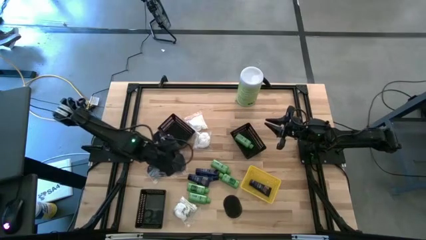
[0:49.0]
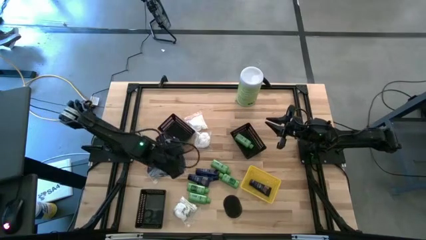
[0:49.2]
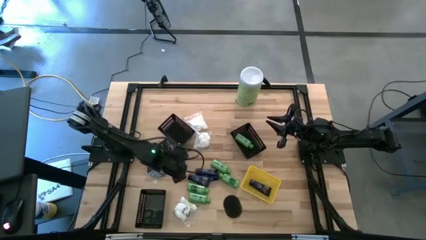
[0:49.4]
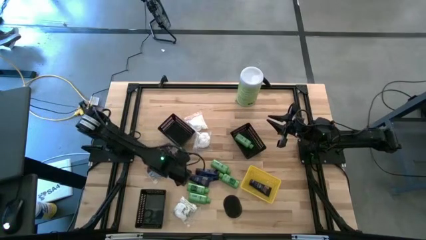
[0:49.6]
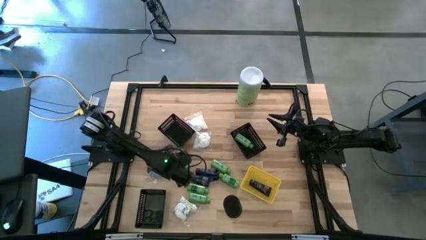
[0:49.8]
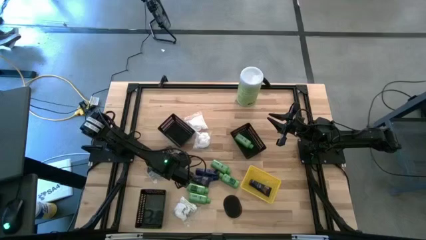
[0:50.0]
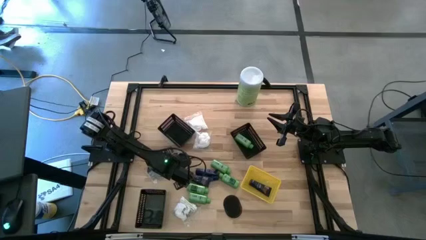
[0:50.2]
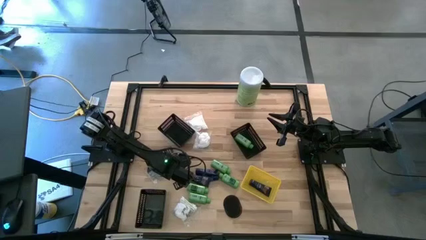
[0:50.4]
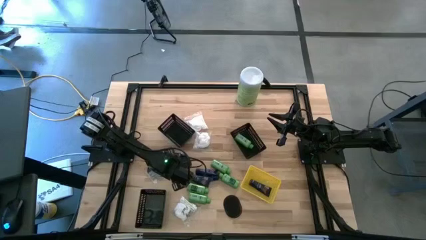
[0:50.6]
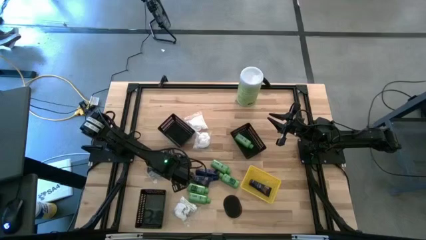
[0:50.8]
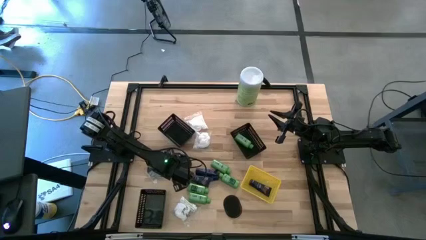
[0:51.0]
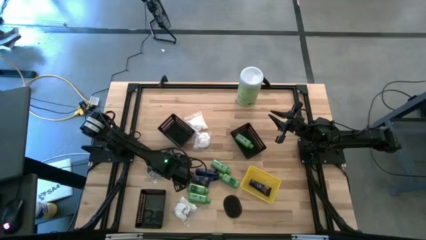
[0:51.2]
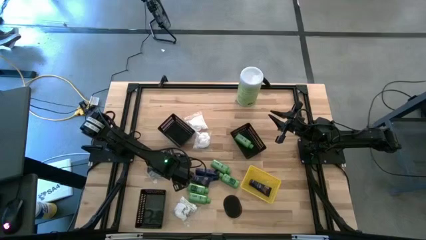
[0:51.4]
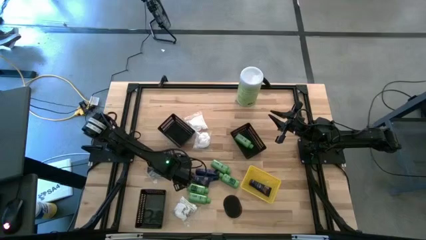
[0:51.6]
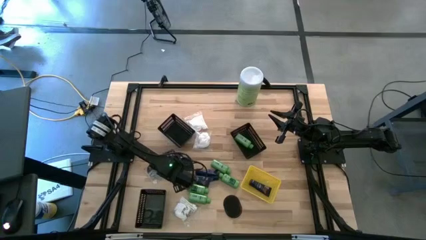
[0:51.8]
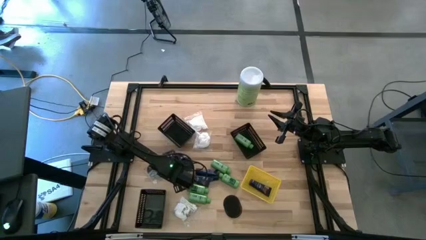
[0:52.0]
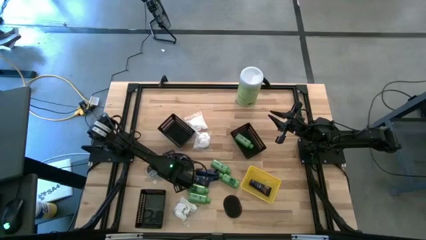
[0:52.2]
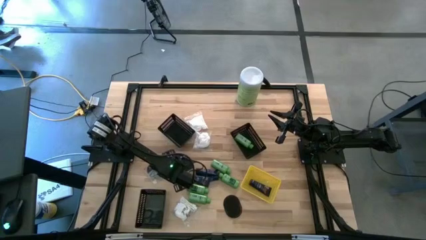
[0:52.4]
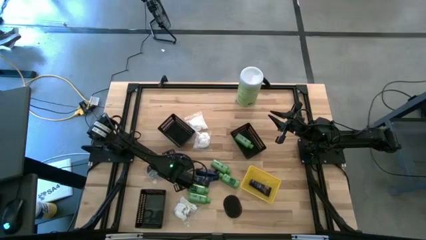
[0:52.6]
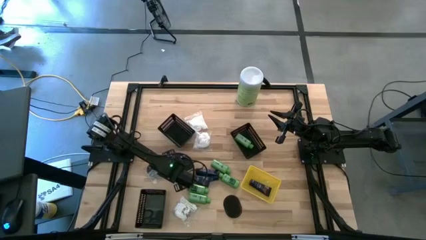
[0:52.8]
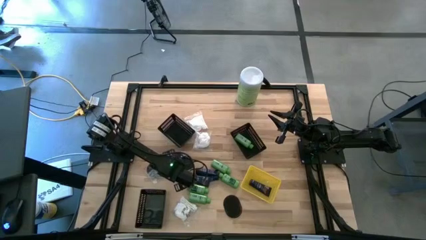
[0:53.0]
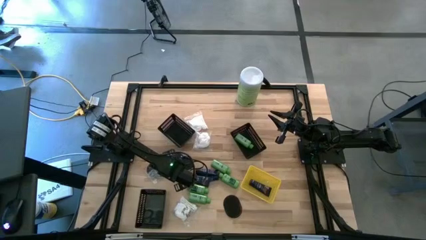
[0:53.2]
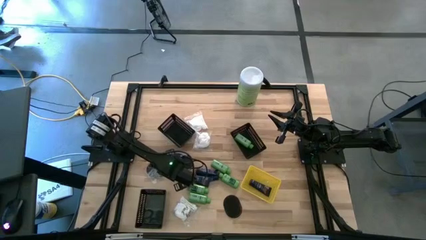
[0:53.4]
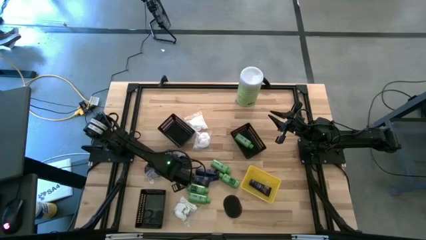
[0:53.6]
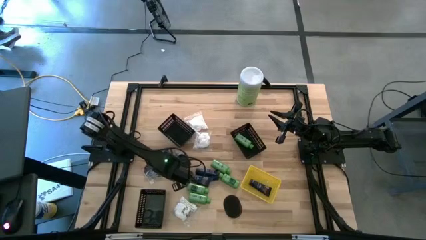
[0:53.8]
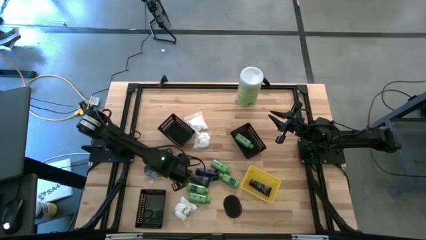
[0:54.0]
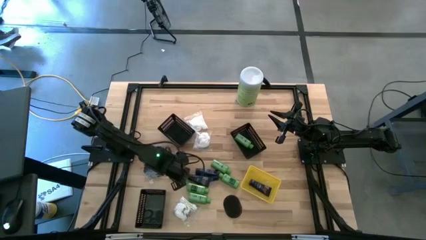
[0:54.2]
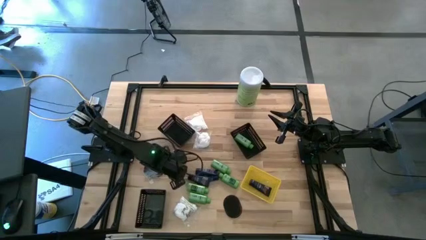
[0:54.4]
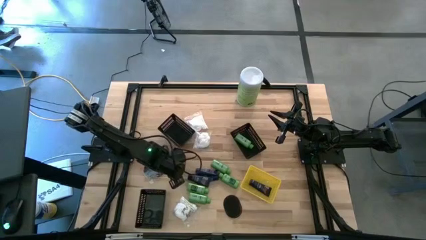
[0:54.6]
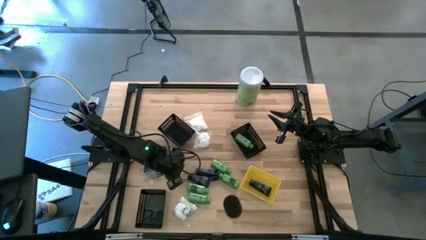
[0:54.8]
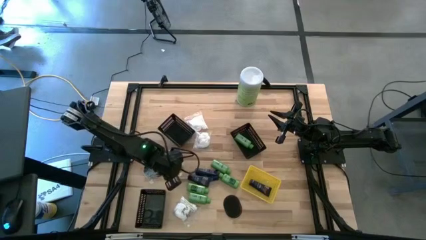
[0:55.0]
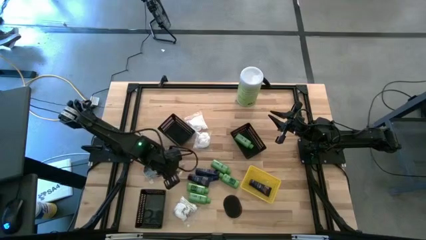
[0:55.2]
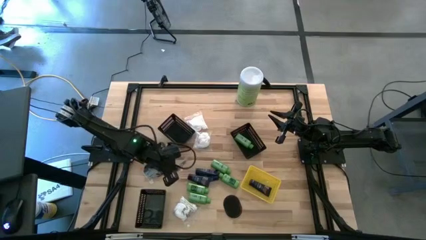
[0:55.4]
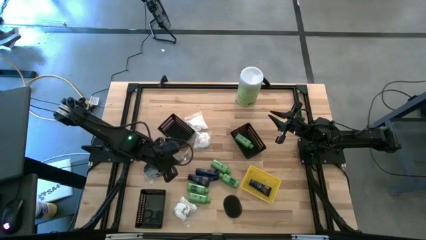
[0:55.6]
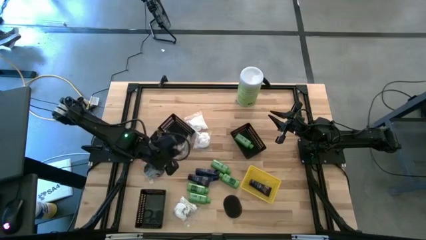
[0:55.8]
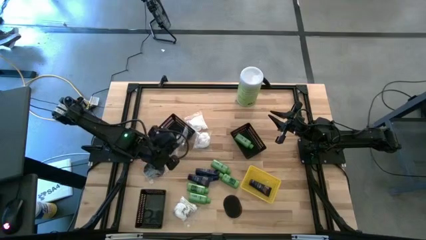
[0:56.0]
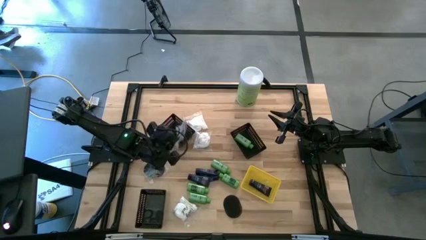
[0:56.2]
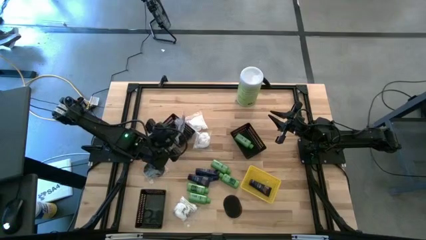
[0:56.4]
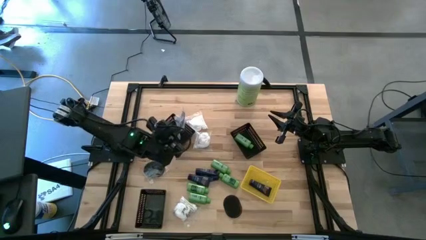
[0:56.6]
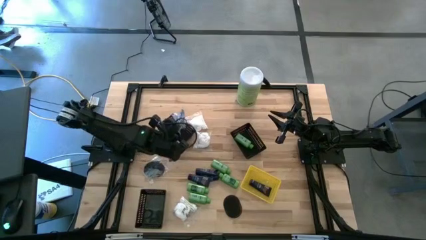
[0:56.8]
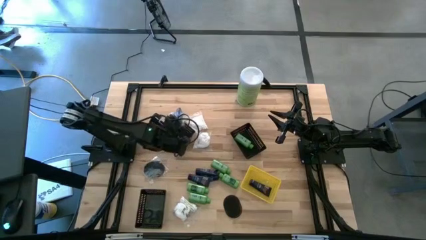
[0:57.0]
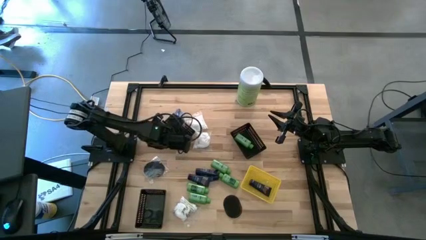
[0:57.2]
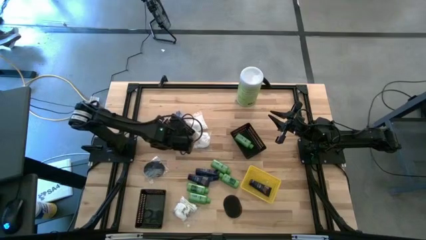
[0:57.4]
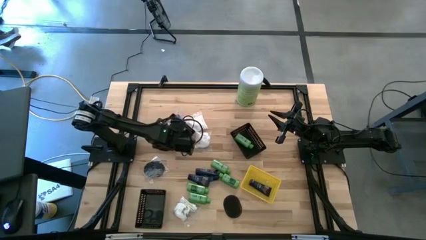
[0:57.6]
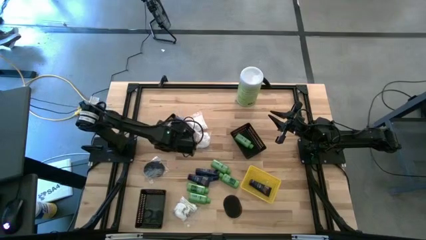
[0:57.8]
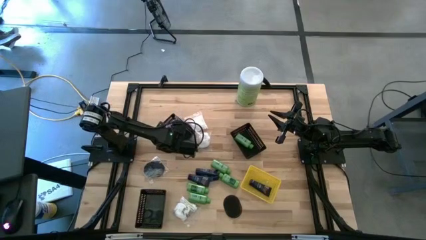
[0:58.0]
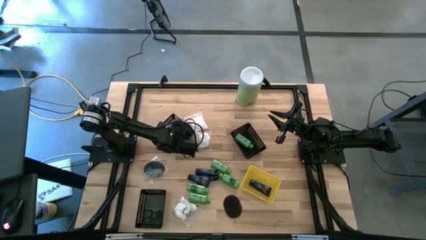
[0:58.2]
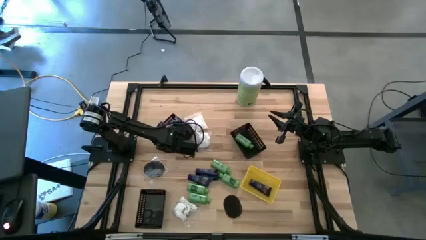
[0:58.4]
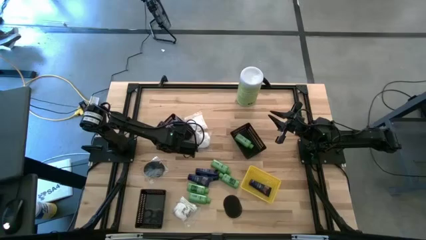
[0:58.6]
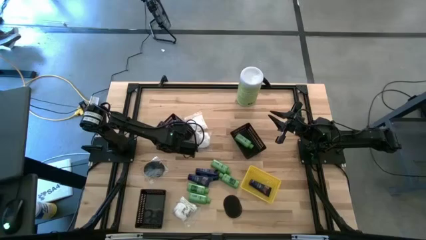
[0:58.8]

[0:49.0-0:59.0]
Task: Pick & Place Travel size toiletries
Put the hairbrush into the top left black bin

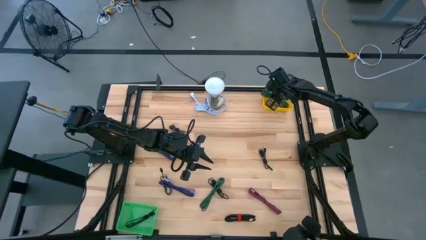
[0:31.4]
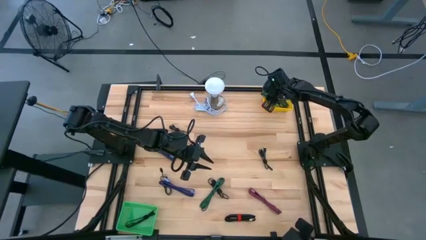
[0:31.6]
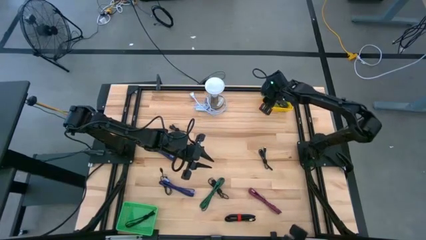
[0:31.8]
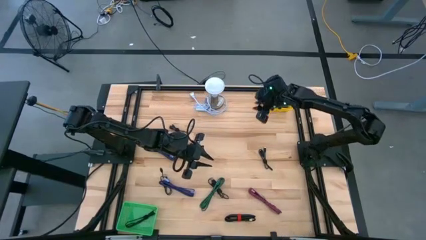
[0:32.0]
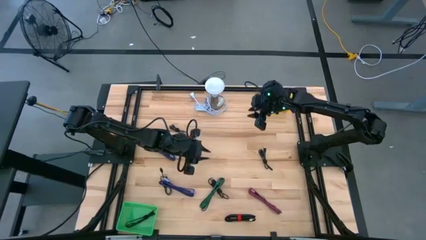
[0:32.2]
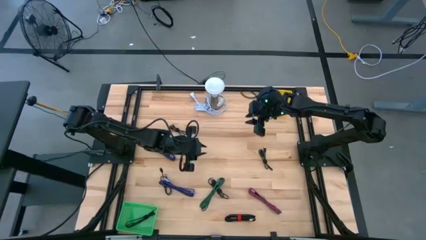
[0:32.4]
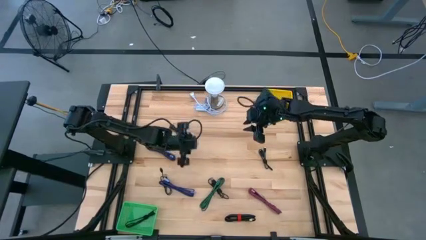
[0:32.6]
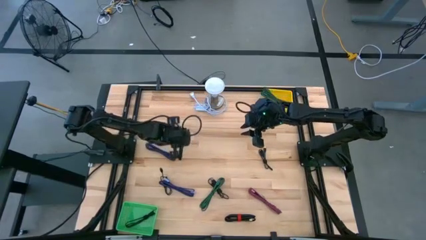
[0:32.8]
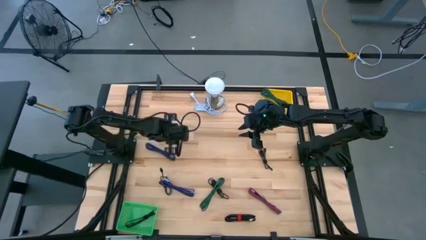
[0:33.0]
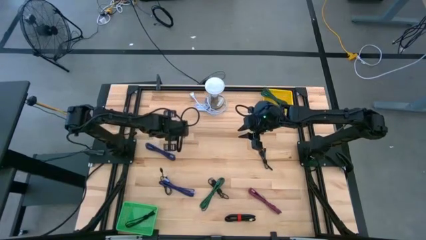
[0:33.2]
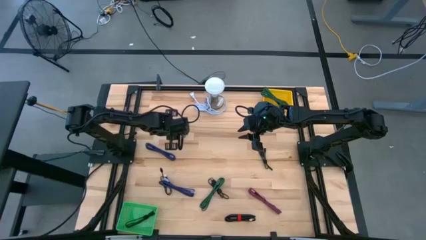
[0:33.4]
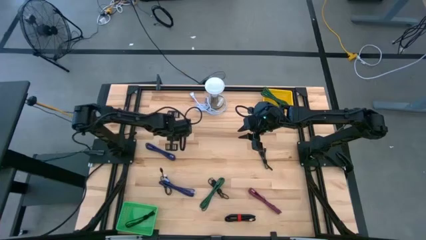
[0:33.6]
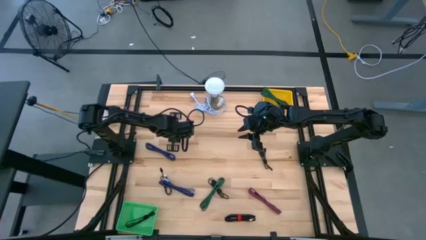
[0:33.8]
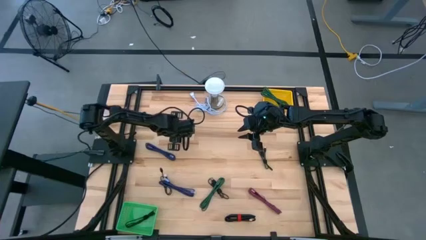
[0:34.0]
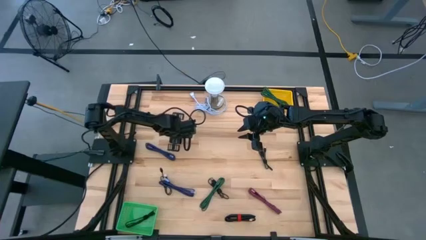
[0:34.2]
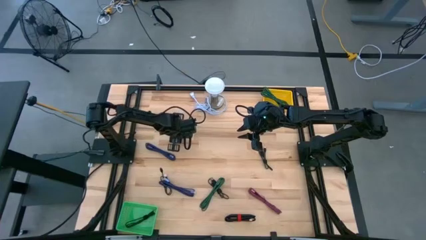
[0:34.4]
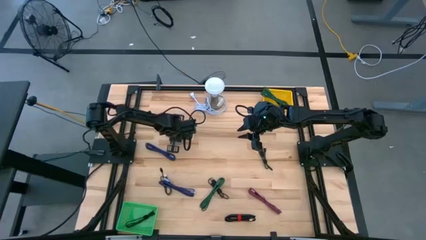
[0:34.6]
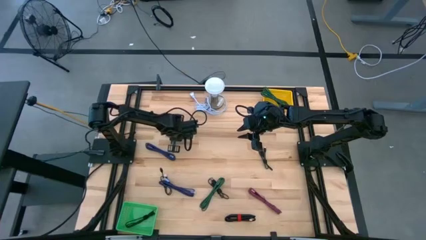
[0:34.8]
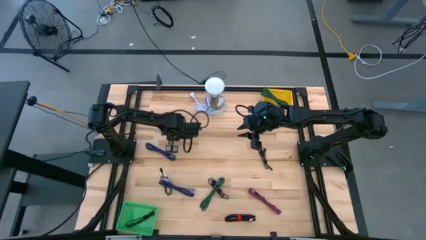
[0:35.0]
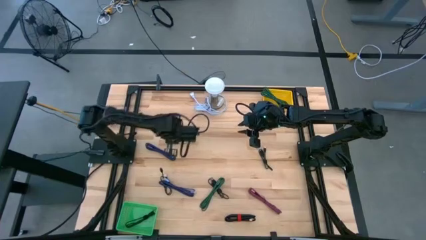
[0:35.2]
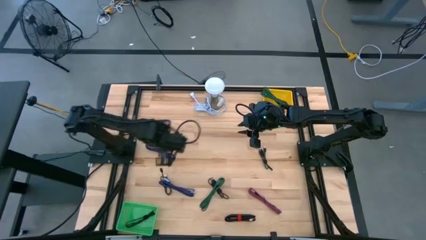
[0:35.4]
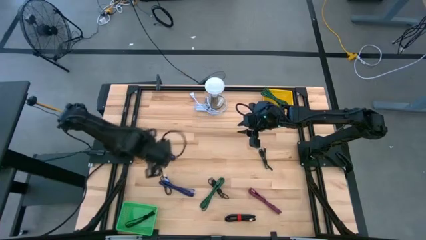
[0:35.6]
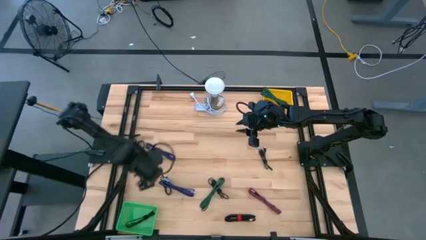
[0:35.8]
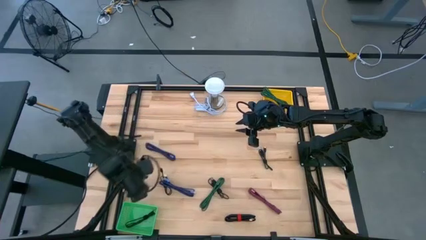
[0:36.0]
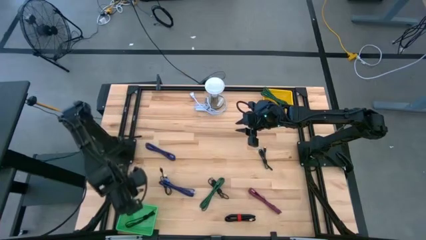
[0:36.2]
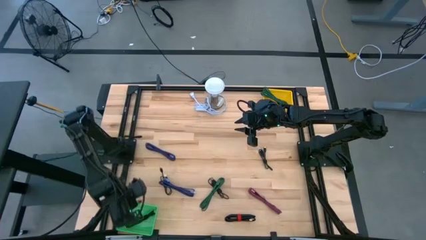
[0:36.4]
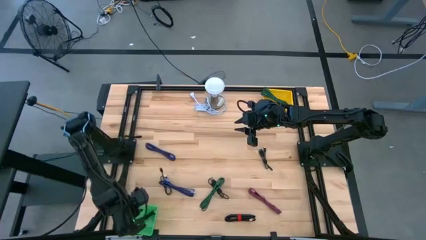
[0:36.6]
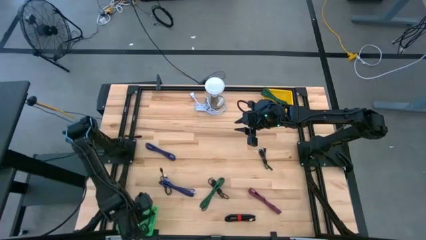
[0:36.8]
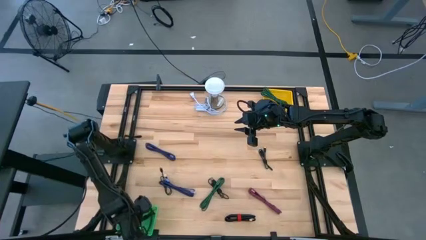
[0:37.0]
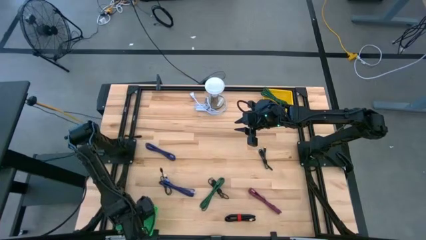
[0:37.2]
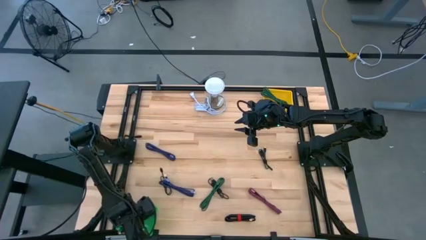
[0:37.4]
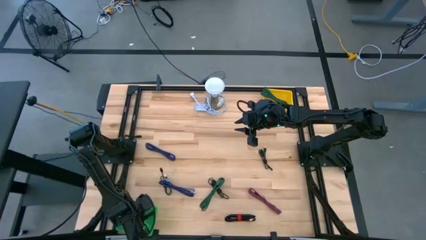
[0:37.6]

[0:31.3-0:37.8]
Task: Pick & Place USB Port
Put the black USB cable into the green bin
